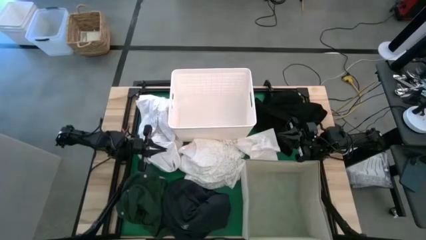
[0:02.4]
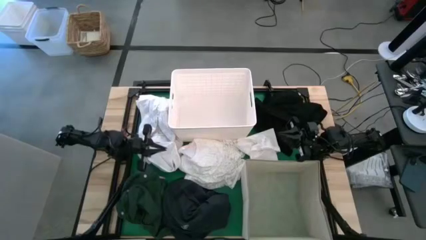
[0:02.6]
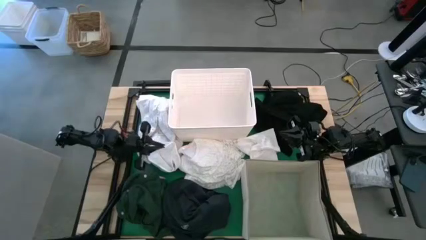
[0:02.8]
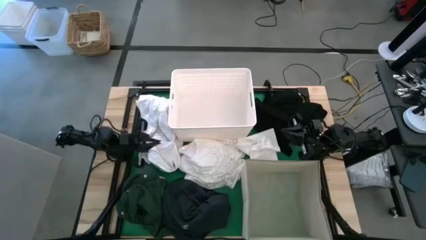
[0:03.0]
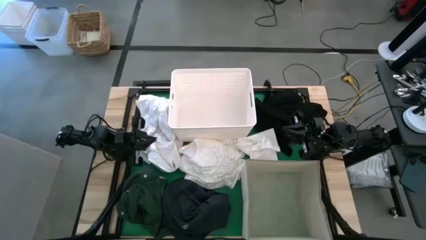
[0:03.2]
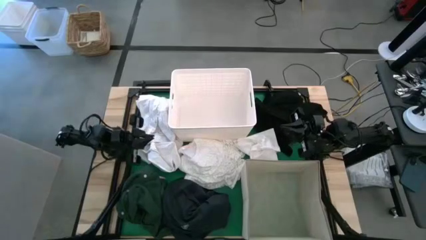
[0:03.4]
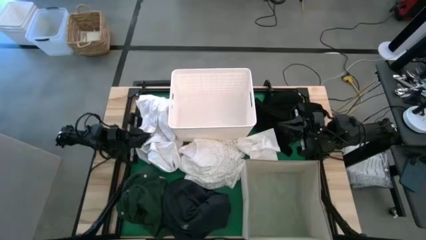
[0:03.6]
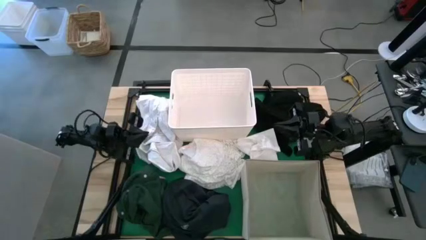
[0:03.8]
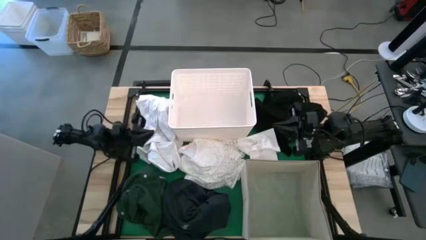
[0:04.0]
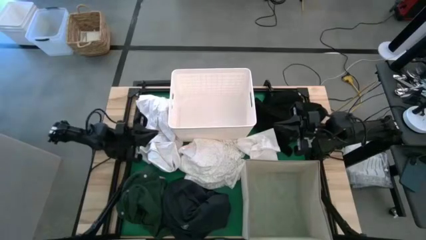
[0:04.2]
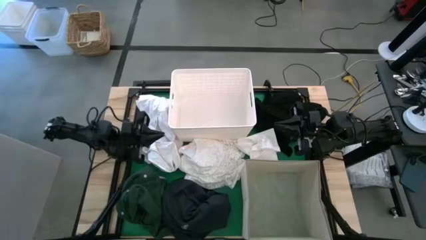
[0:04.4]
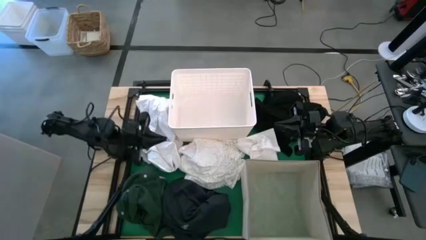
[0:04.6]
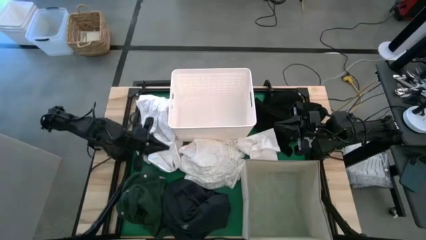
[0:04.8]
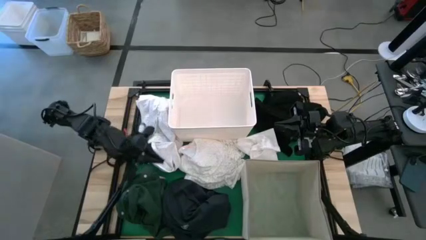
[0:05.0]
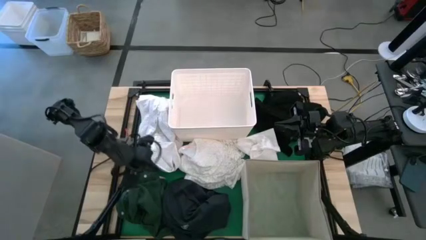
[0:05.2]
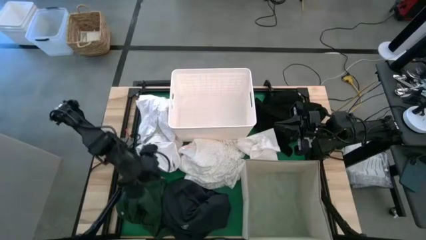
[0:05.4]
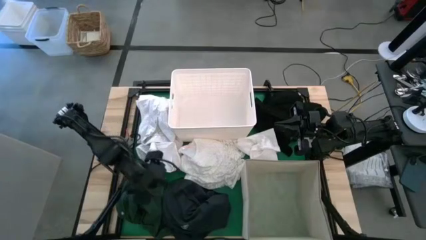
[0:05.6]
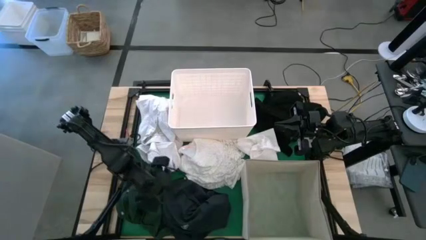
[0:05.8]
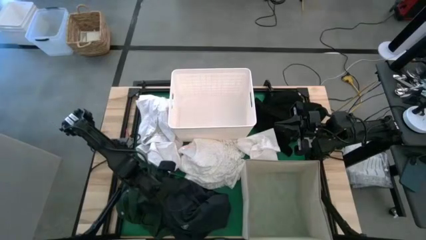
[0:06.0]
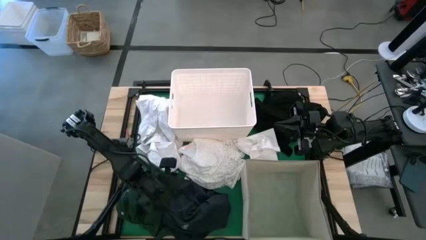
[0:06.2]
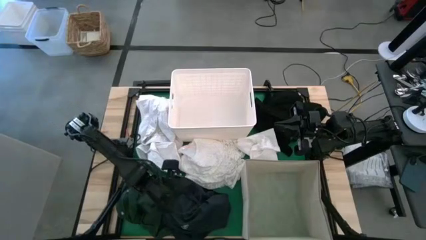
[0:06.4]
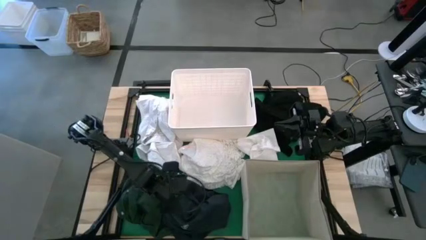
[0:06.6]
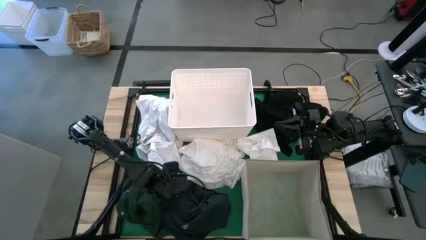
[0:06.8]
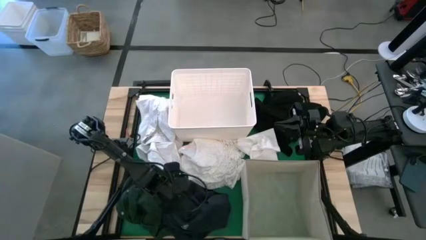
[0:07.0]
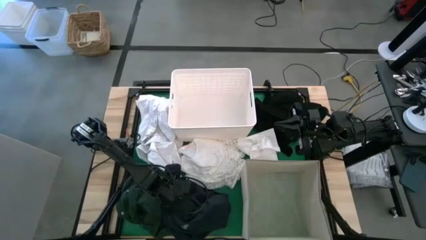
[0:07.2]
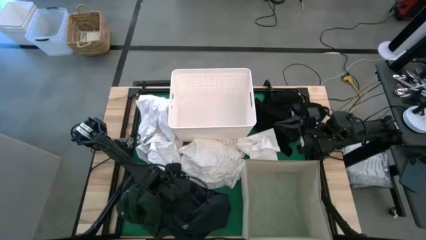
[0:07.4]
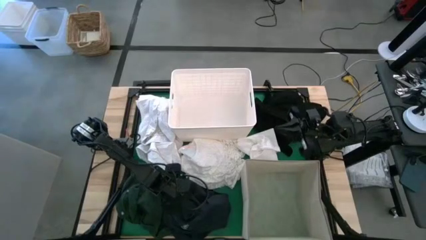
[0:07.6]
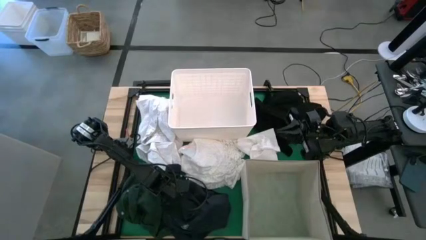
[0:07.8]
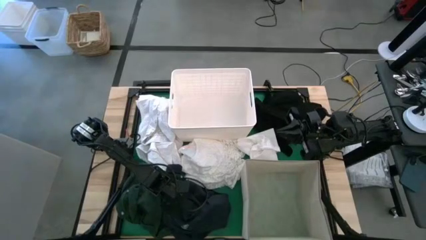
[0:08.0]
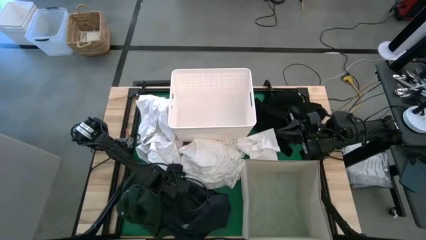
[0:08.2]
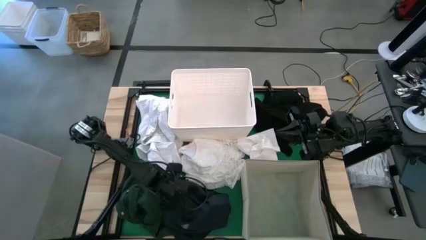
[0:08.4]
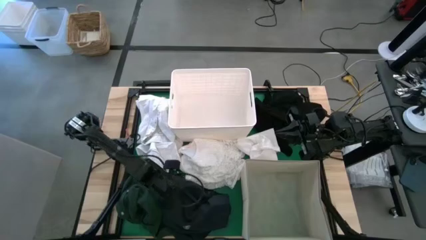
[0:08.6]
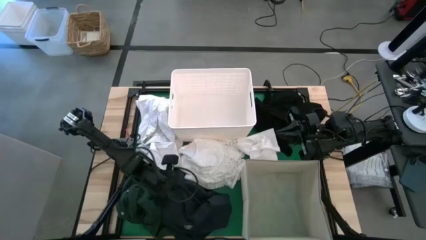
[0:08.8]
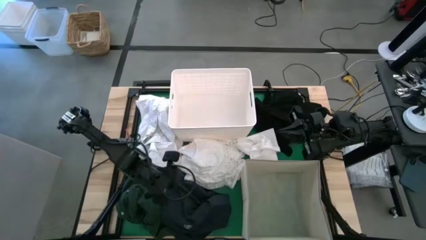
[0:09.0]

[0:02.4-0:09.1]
Put the black shorts into the white fabric storage bin
